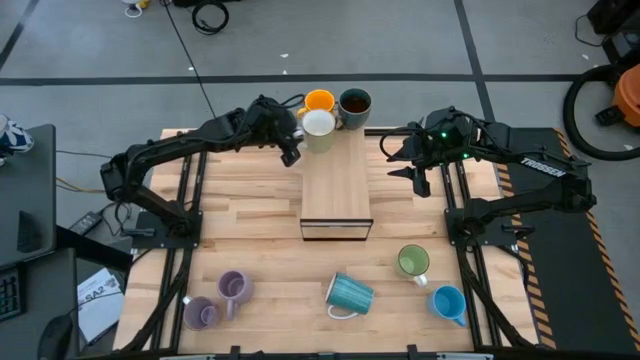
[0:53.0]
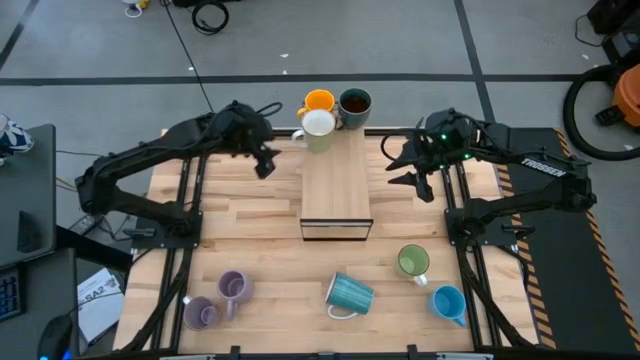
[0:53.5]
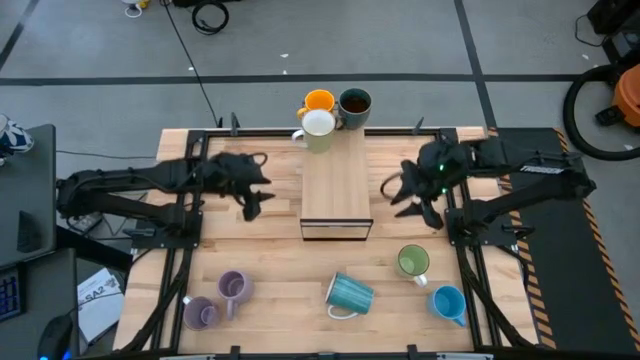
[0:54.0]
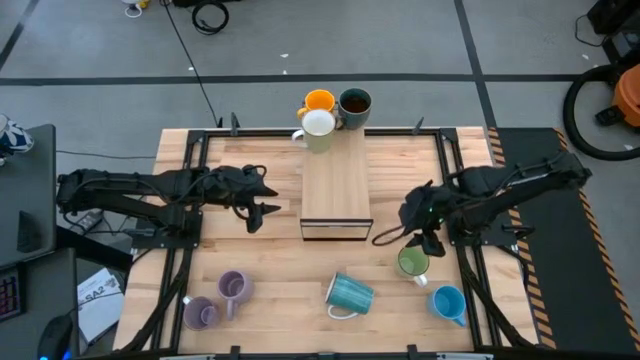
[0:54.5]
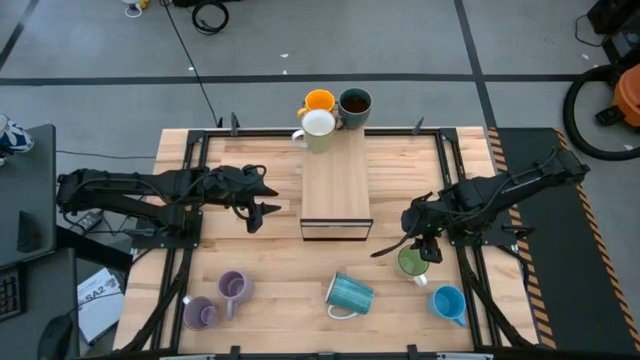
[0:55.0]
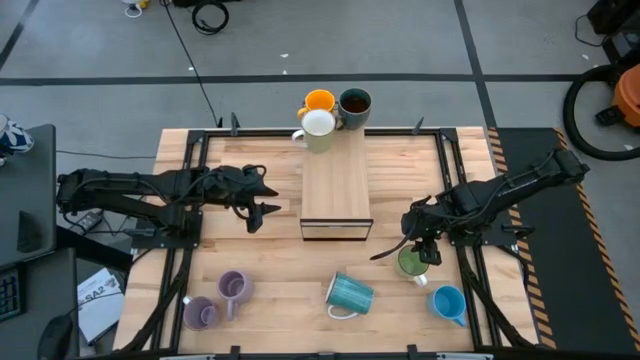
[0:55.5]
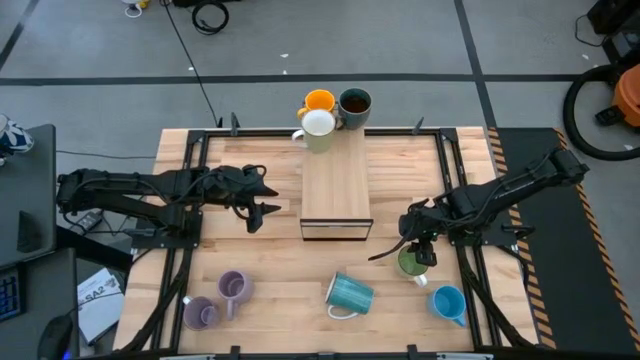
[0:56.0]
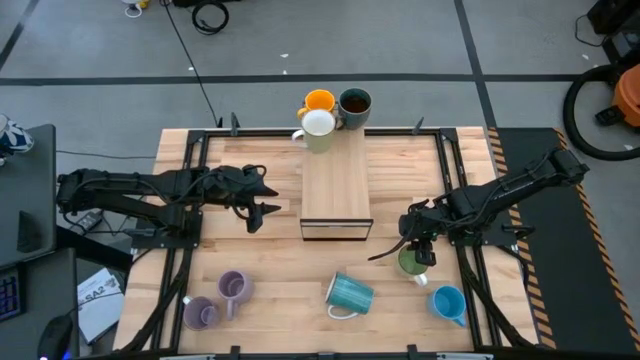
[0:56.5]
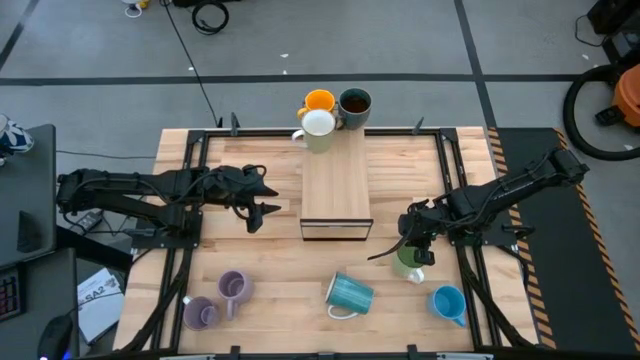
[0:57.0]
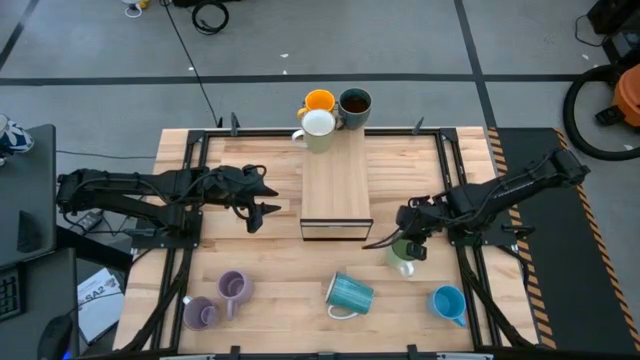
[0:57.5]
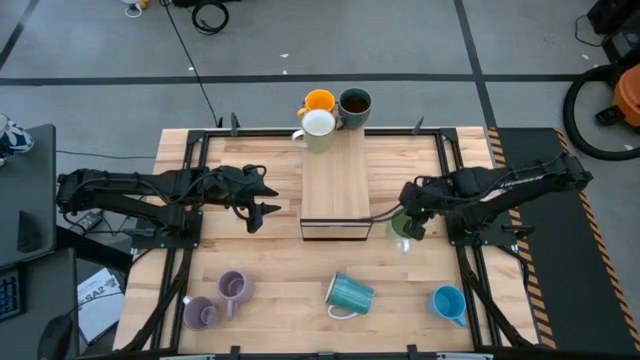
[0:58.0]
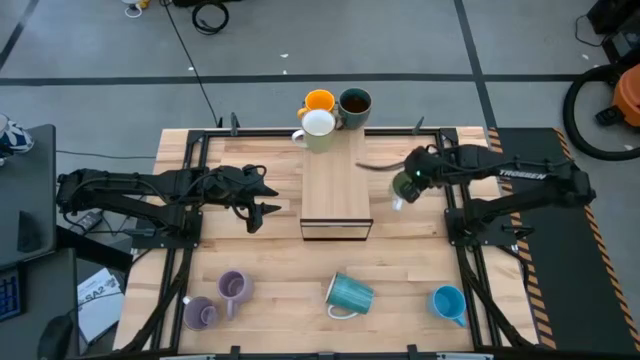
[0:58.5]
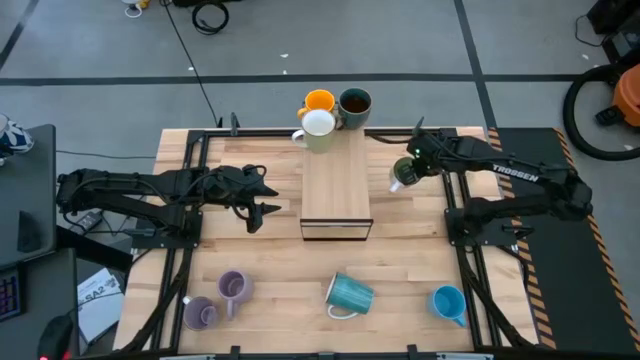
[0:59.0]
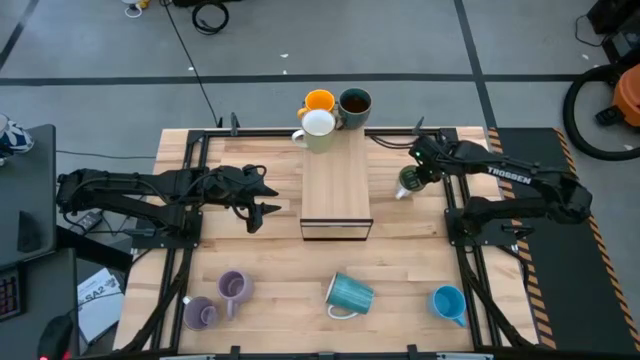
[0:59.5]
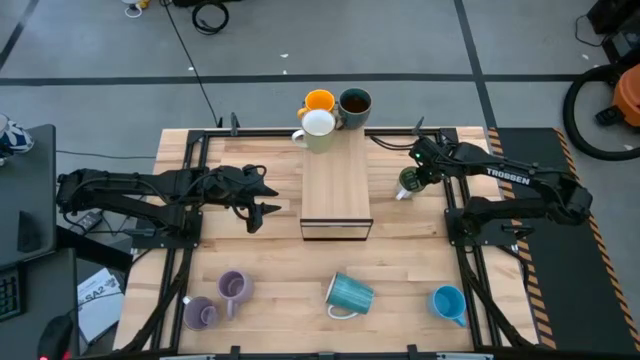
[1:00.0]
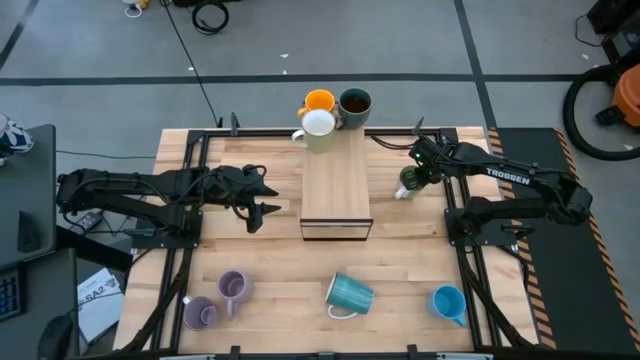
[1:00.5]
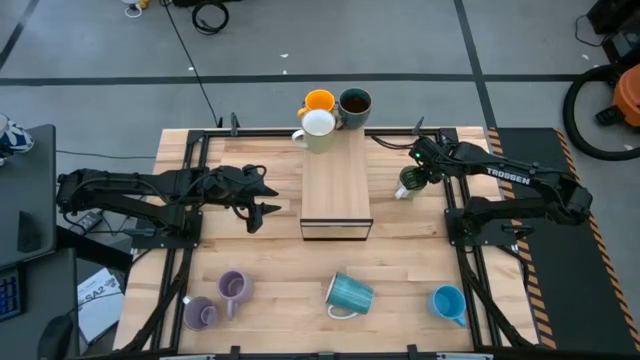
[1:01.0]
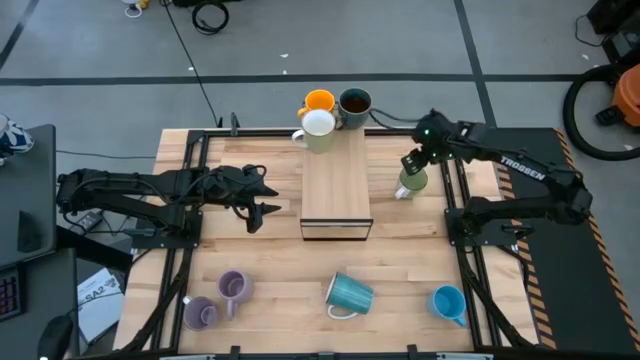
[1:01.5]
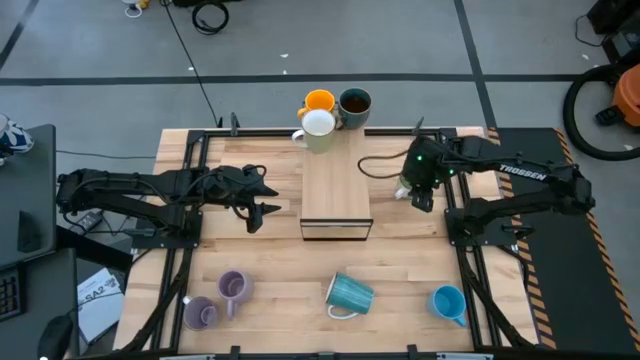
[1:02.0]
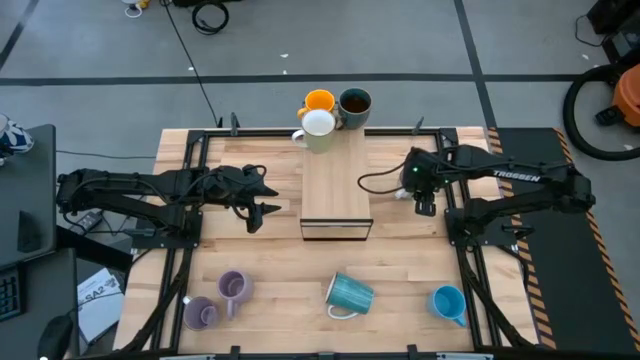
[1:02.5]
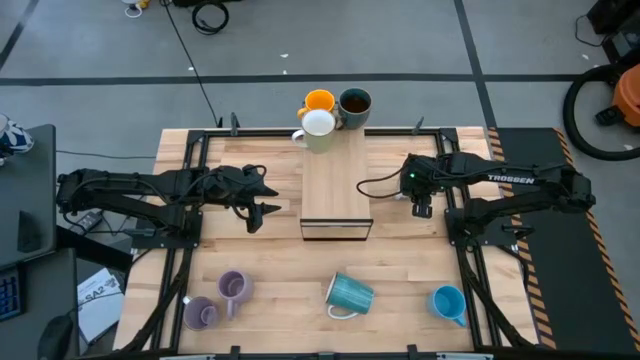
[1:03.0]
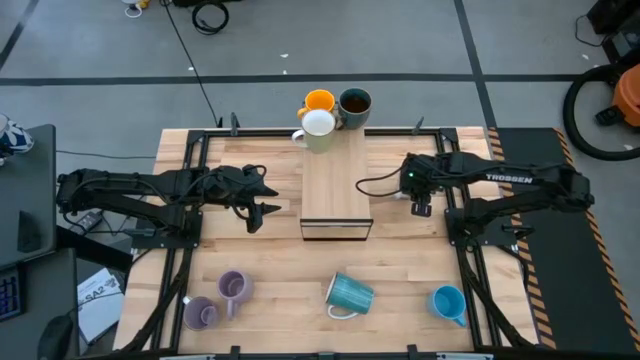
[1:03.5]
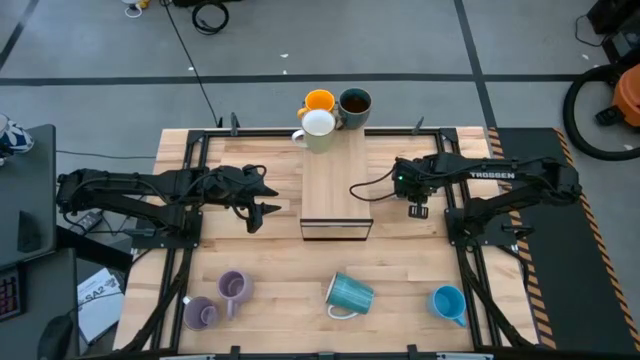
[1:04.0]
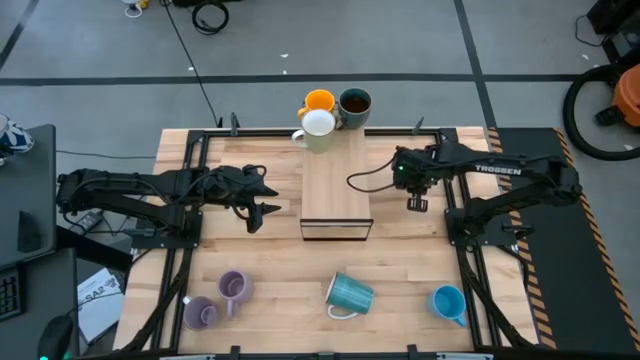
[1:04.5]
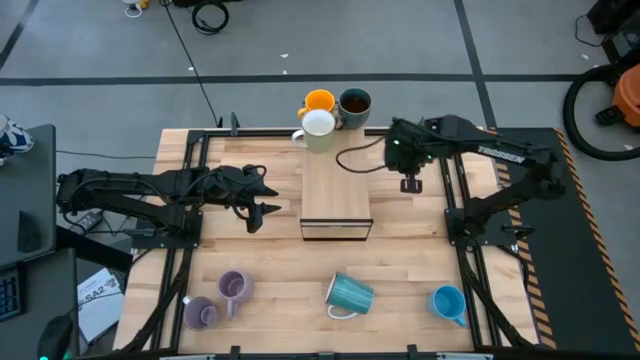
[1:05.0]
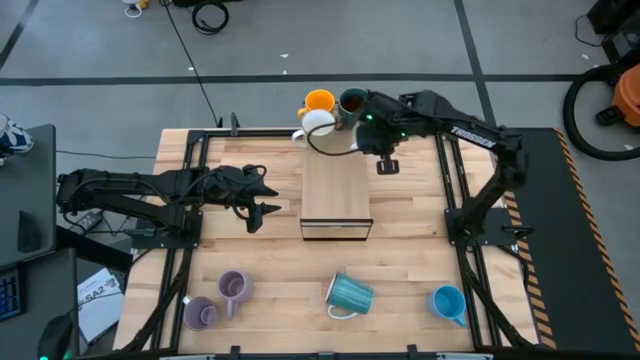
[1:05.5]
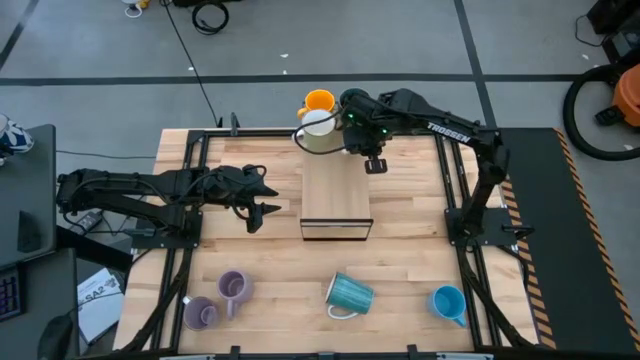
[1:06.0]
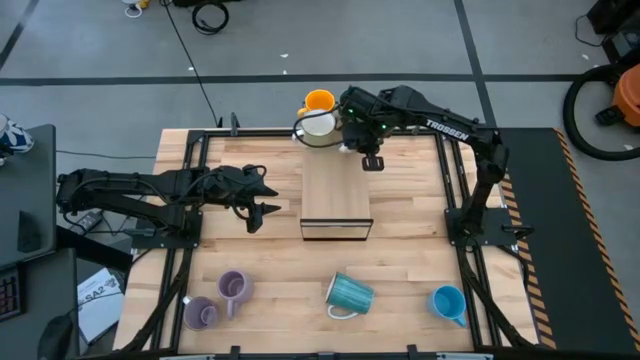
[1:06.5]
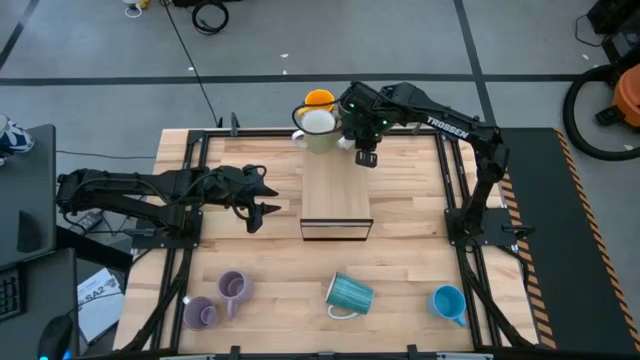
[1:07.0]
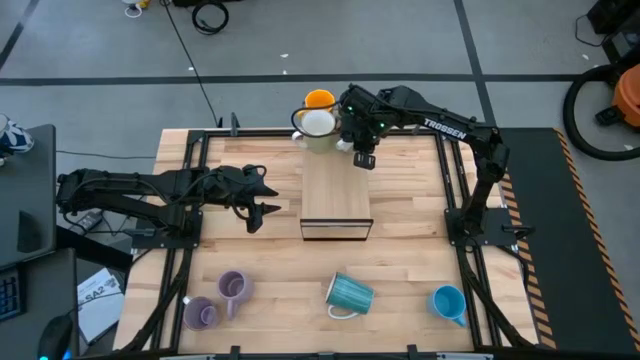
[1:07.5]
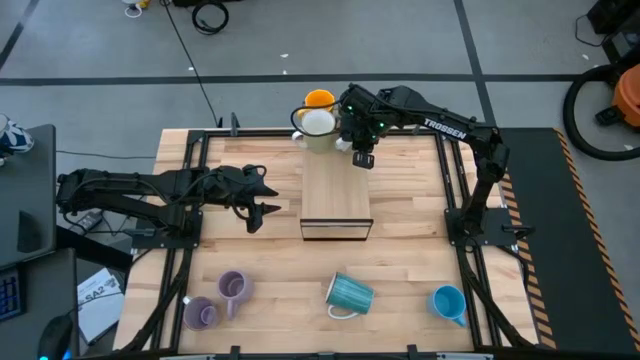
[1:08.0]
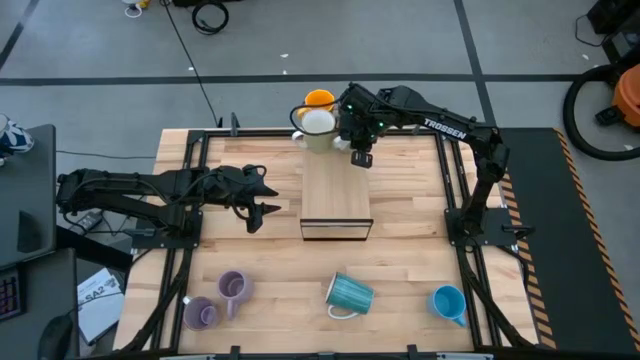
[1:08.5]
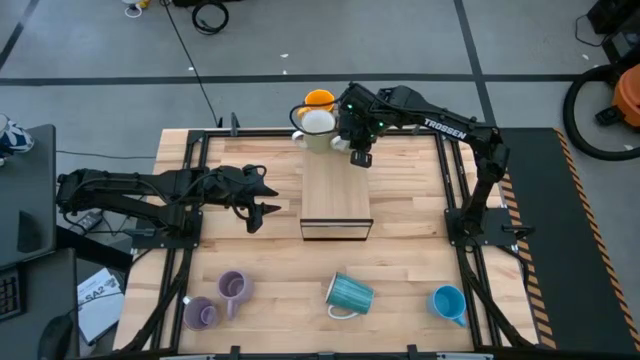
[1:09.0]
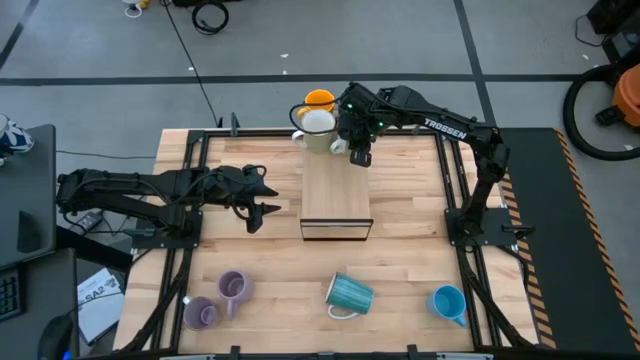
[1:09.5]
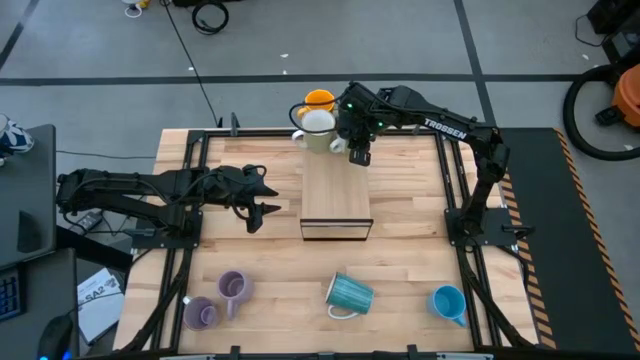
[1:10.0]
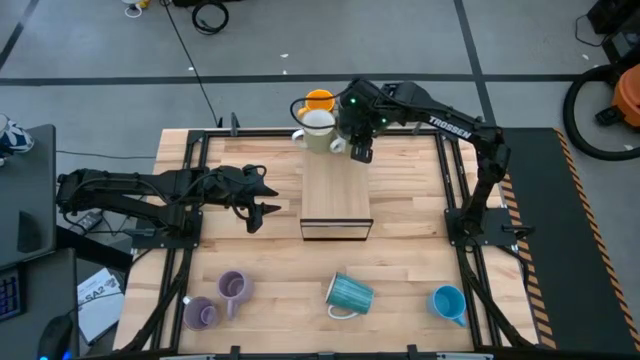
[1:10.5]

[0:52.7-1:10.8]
Task: Place coffee mugs
Put the light green mug on the shelf
